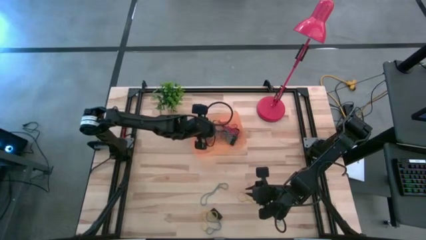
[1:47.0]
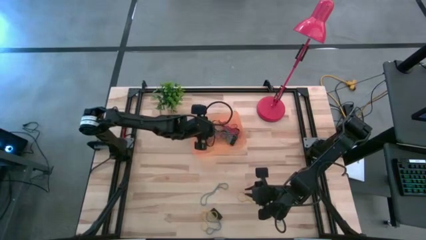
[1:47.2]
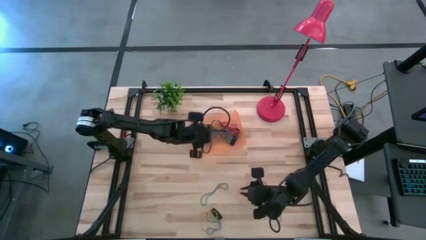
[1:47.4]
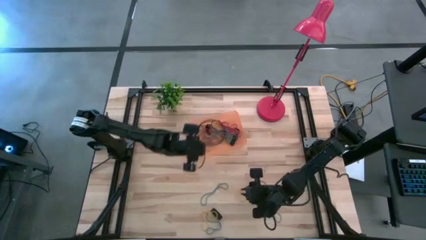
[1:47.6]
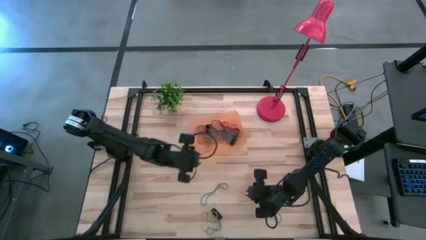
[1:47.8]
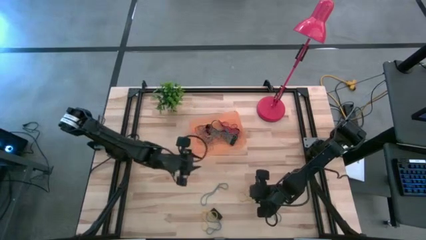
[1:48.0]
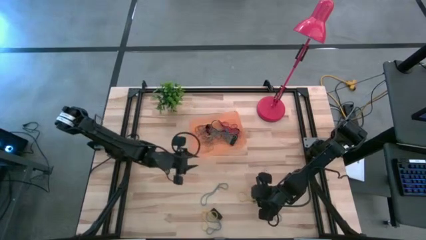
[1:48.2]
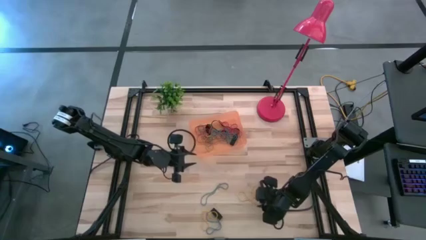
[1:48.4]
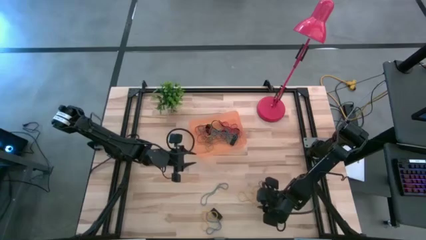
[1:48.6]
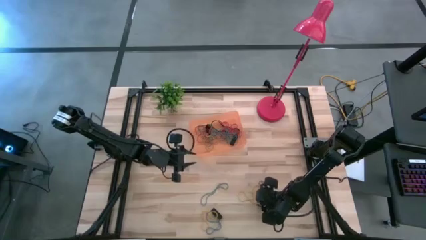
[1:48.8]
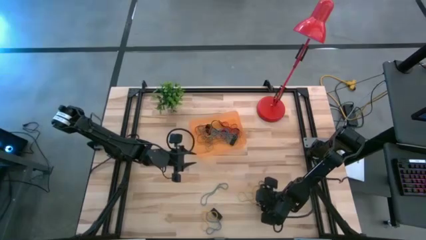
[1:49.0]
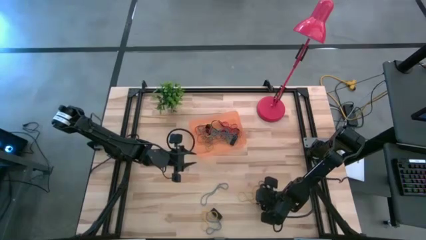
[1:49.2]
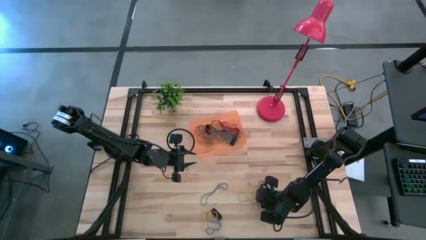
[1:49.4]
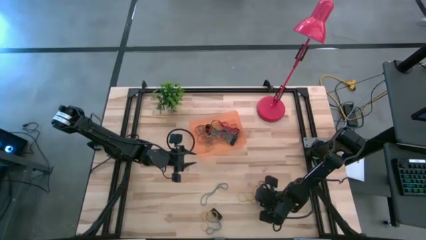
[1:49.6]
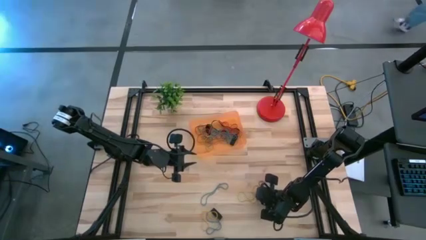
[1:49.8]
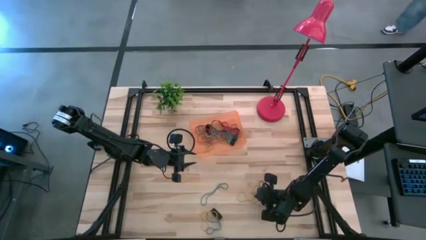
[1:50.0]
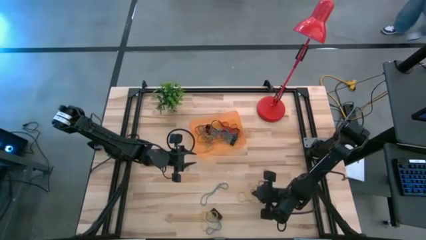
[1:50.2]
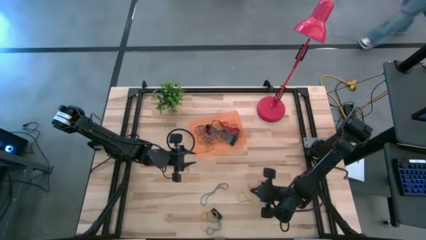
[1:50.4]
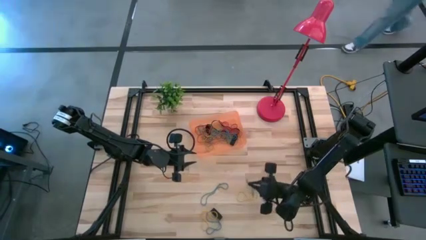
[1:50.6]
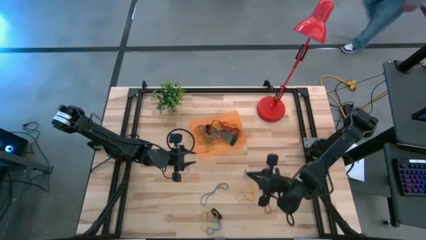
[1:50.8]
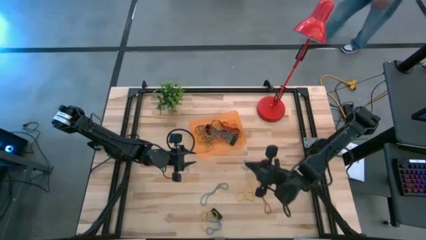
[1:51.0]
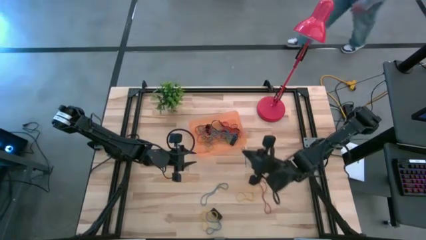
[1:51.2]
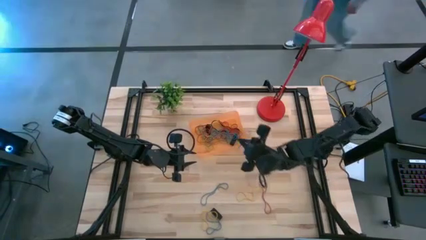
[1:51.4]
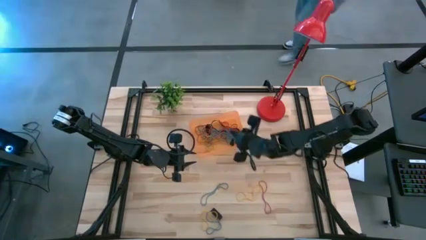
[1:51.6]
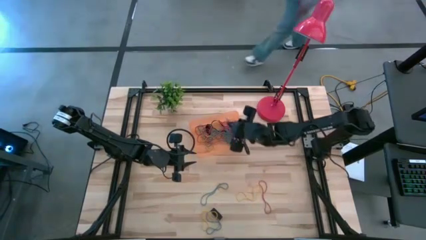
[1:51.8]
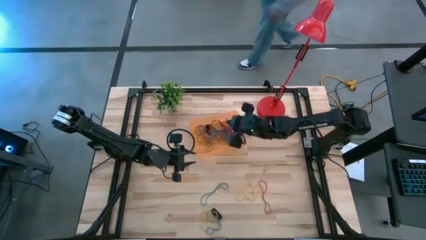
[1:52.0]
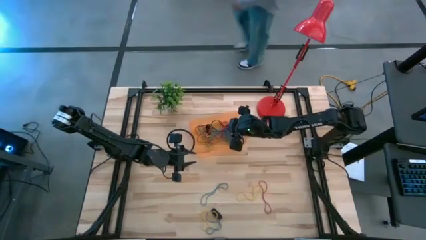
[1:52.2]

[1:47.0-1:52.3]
Task: Pick and place rubber bands into bin
Put the blue rubber band into the orange bin

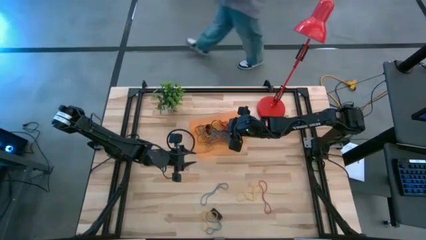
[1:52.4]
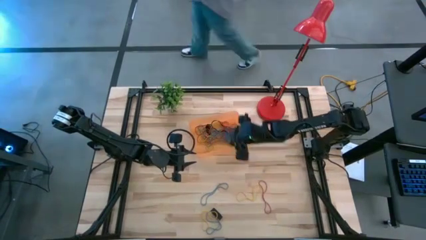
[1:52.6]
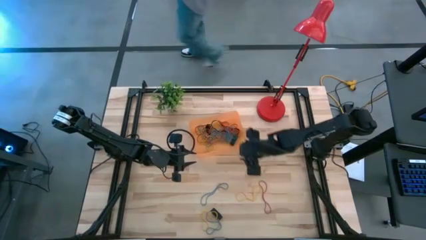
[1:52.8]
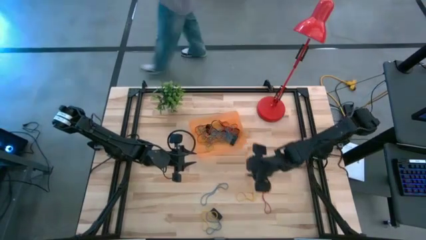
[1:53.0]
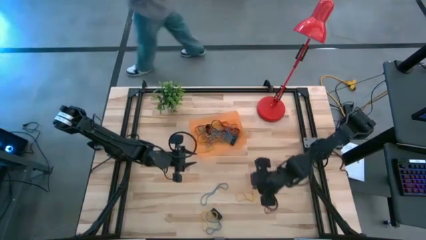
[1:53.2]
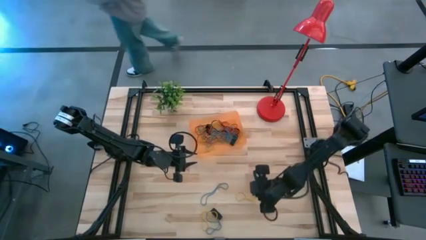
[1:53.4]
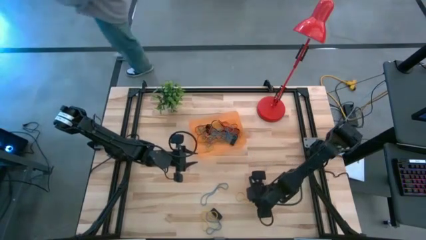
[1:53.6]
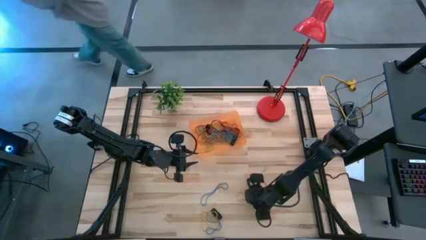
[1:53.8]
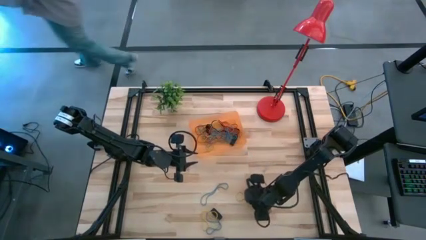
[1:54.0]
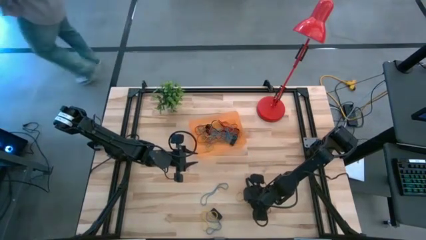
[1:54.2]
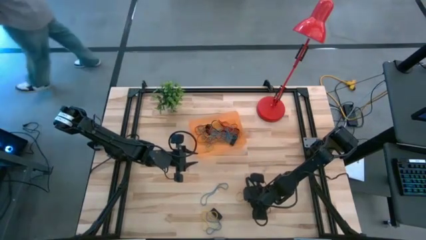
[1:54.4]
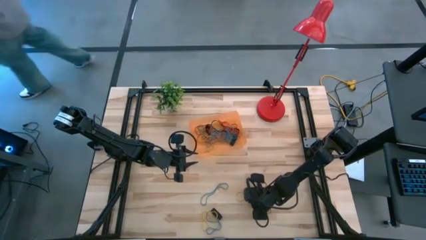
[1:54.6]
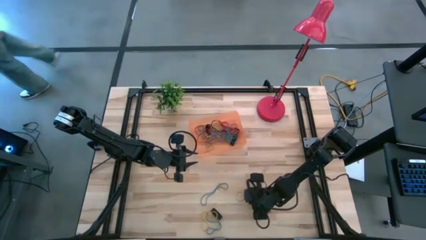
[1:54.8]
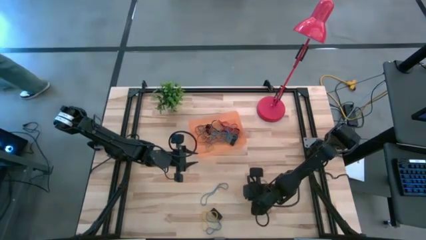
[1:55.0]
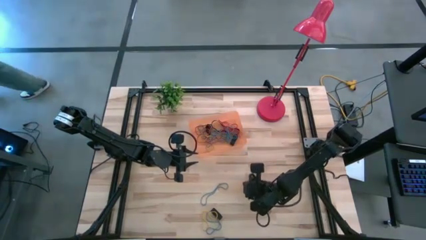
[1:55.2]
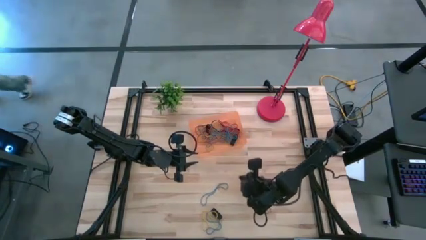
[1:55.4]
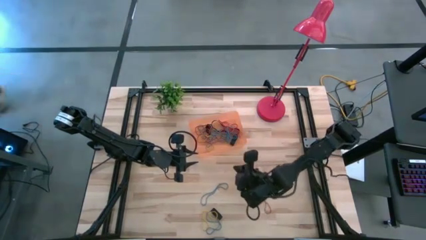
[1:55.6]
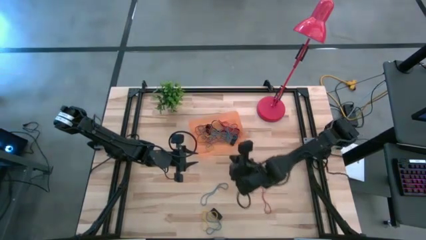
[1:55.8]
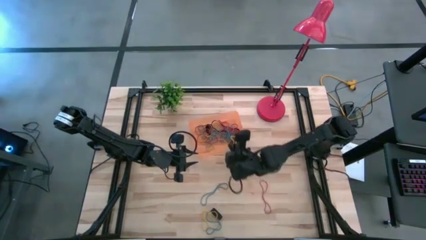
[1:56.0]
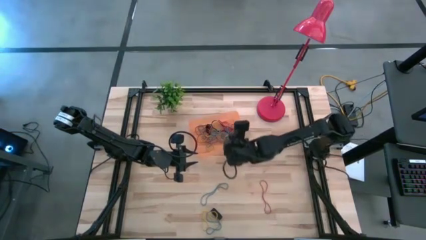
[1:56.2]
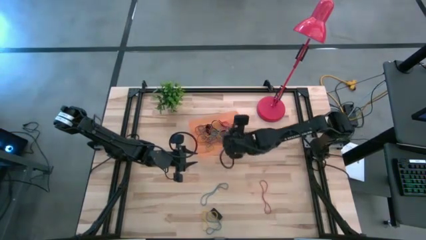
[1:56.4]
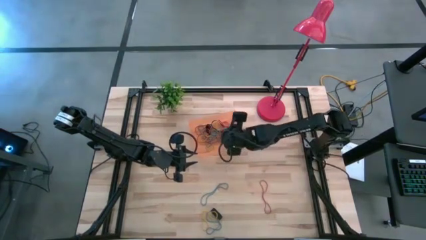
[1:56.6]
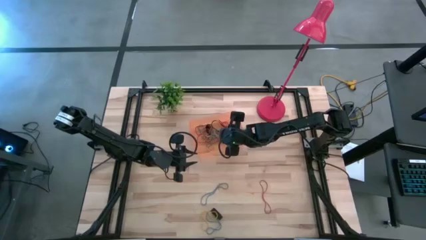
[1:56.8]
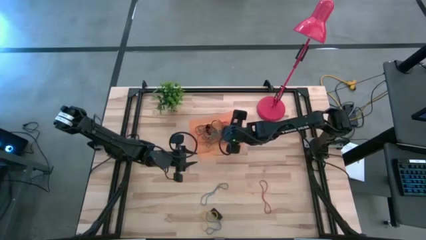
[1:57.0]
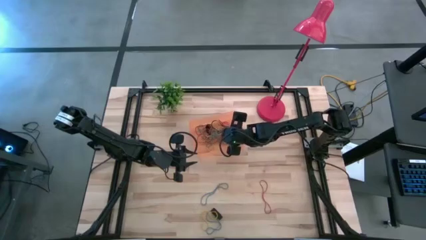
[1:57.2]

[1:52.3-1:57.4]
Put the yellow rubber band into the orange bin

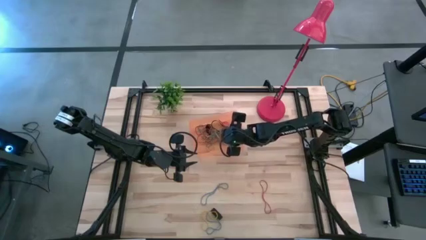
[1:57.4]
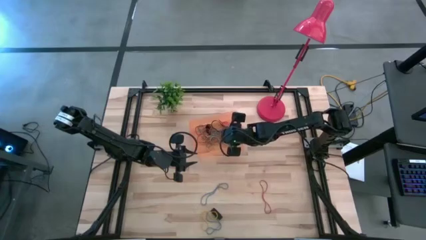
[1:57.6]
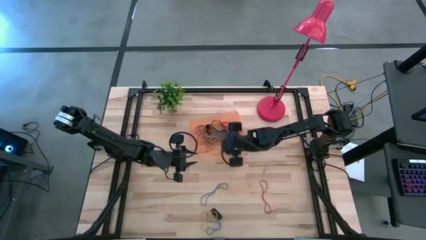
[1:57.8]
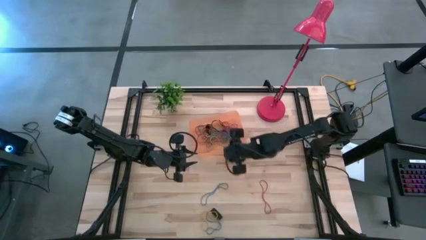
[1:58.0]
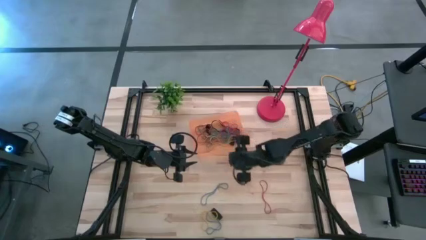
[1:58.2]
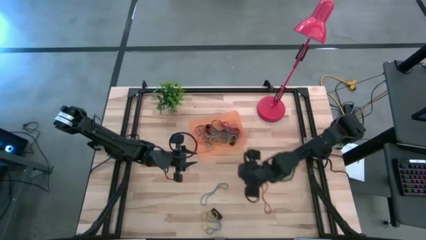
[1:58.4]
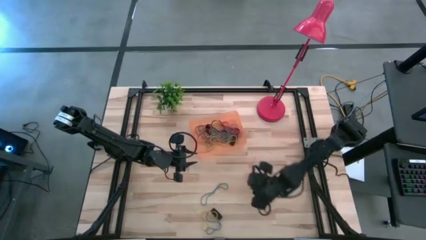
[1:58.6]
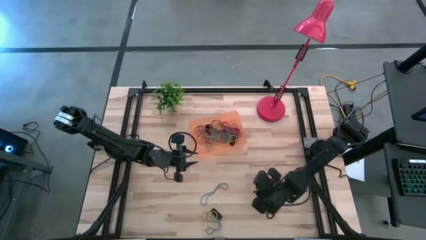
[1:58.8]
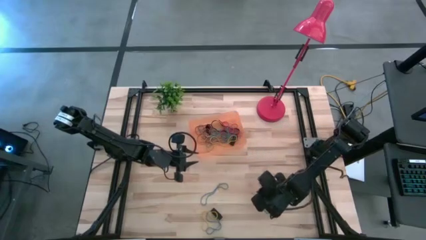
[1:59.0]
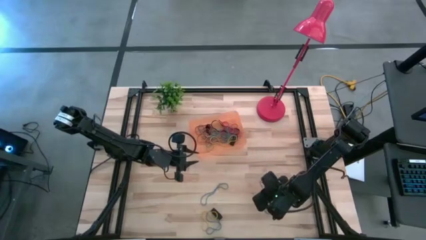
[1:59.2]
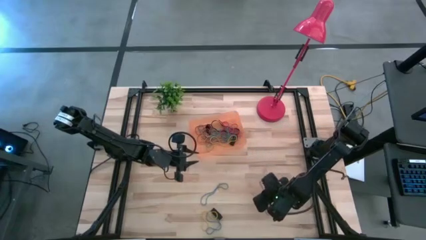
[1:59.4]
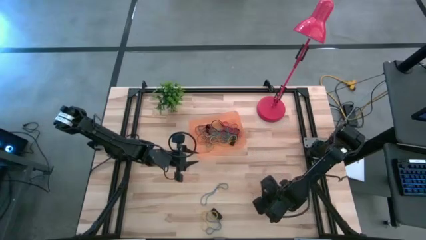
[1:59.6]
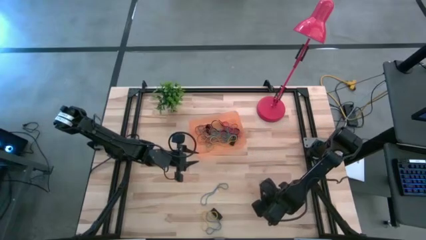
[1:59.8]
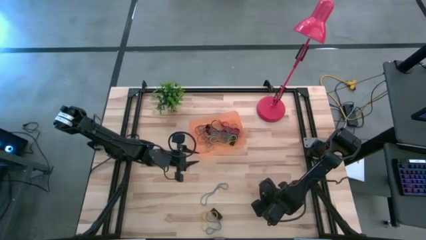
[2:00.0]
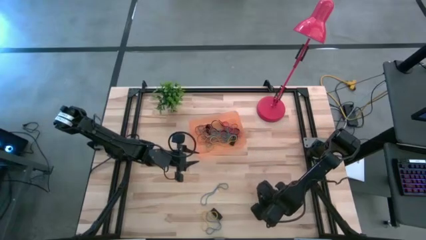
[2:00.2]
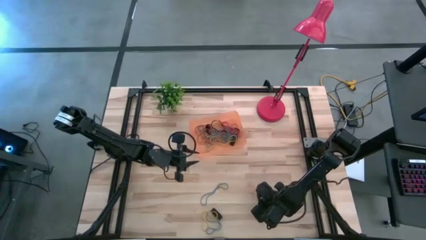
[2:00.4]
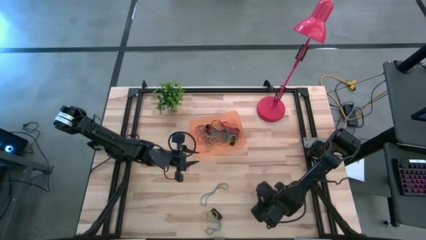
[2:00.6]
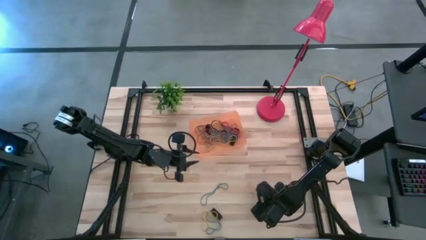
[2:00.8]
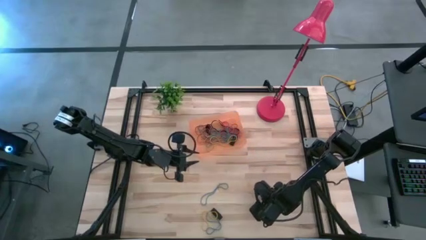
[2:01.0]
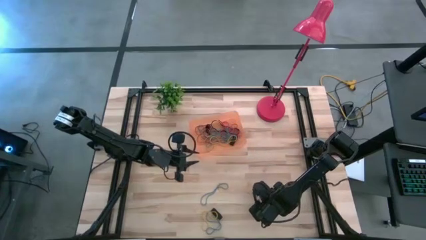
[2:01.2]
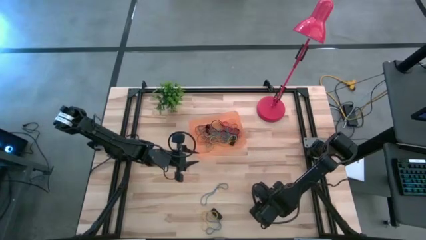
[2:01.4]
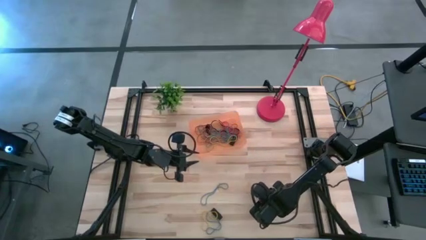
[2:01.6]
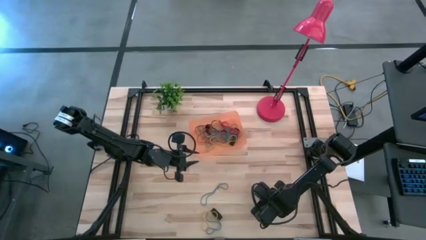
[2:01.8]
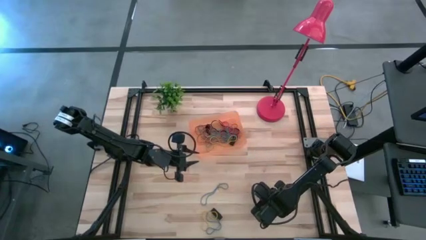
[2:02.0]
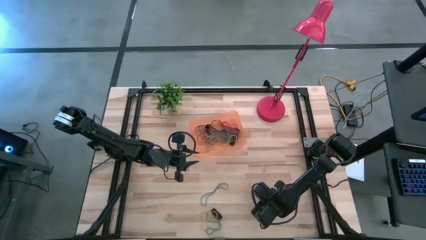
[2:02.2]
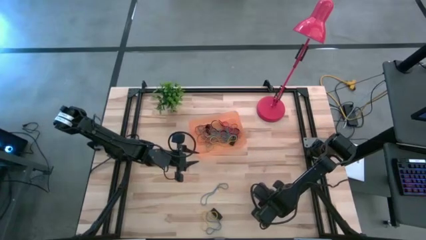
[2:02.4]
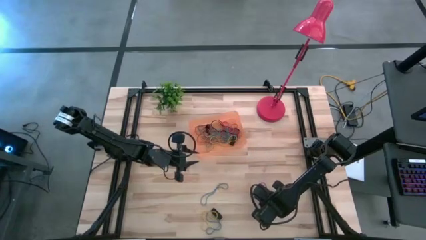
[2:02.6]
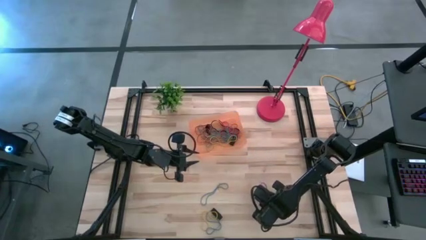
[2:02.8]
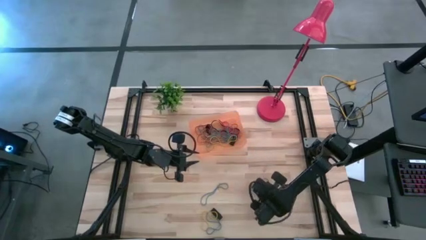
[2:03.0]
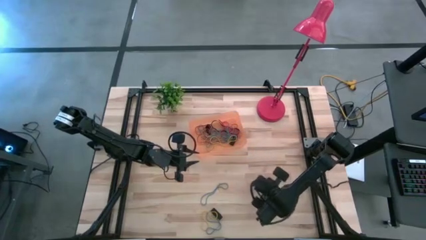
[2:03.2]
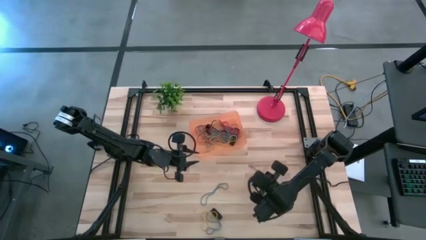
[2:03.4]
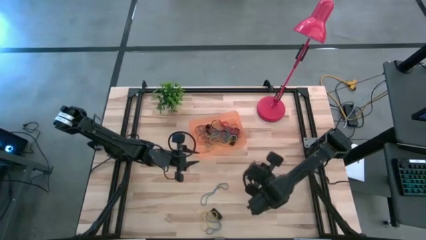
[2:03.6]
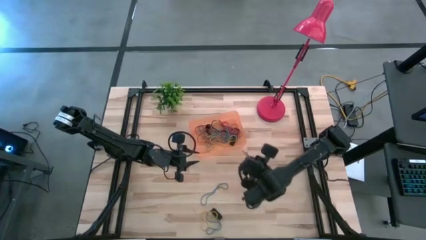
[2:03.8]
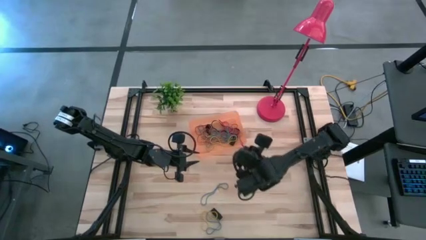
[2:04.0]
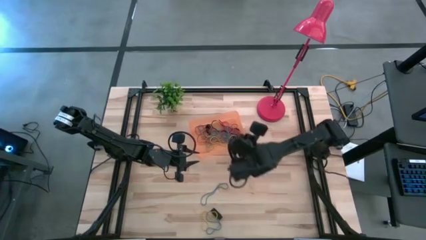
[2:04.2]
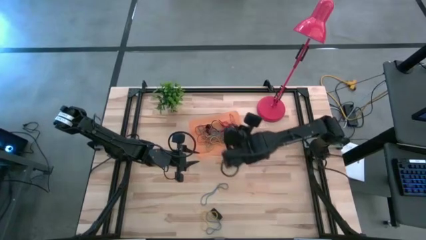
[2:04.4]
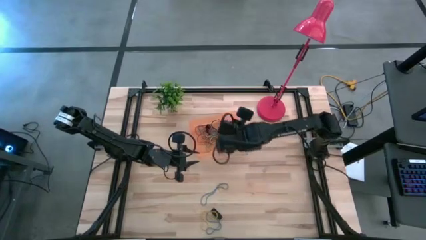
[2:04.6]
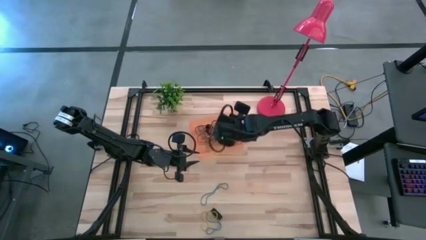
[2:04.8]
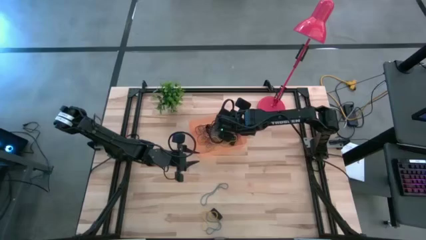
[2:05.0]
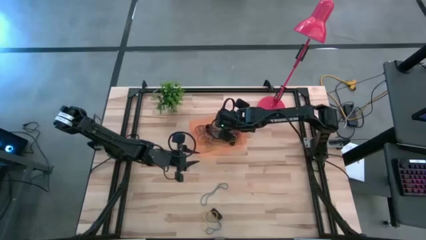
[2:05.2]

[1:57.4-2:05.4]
Put the red rubber band into the orange bin
